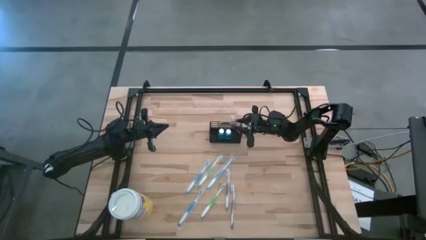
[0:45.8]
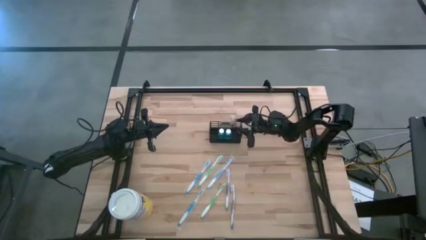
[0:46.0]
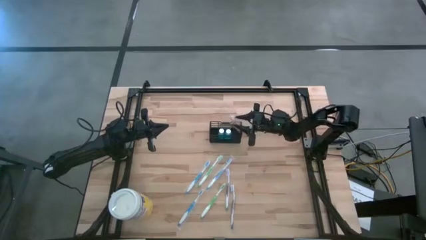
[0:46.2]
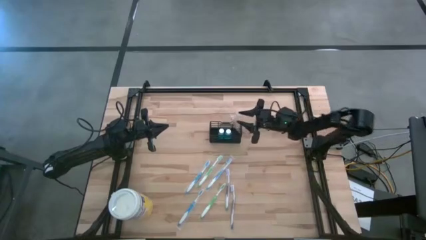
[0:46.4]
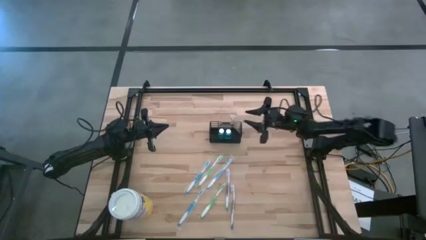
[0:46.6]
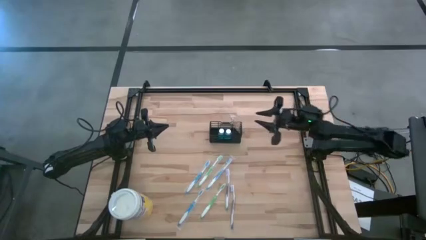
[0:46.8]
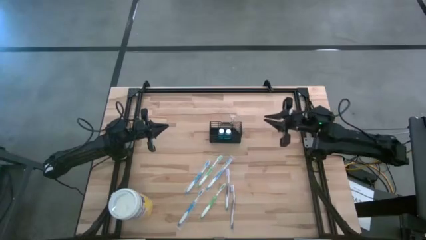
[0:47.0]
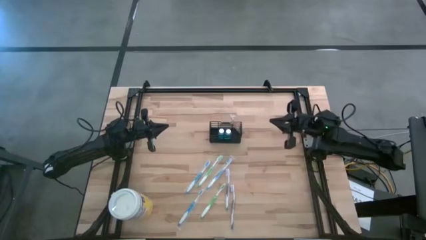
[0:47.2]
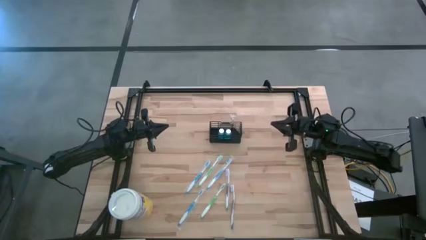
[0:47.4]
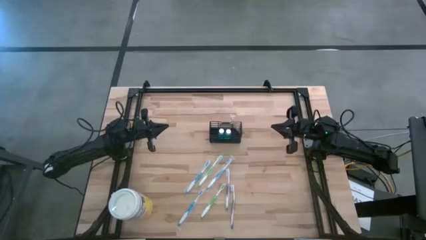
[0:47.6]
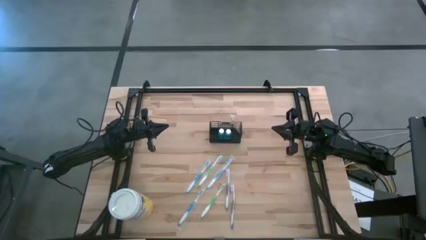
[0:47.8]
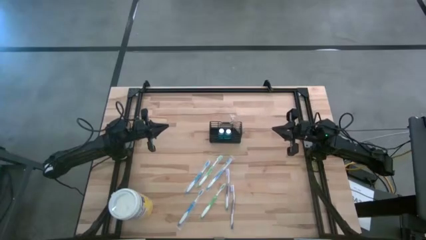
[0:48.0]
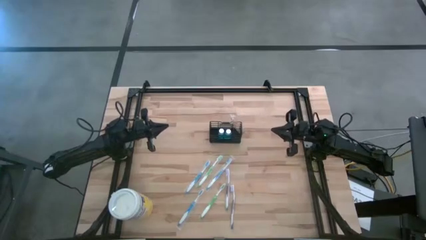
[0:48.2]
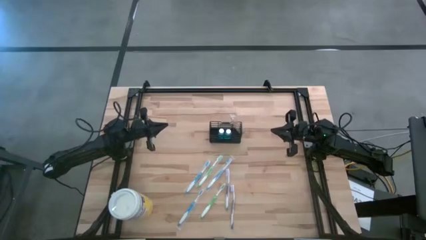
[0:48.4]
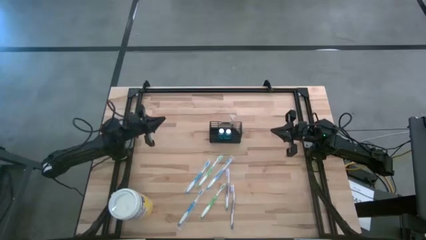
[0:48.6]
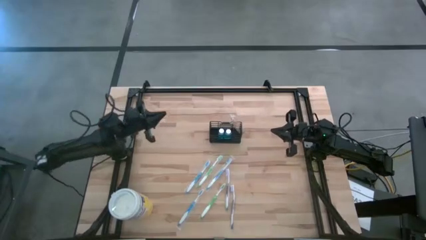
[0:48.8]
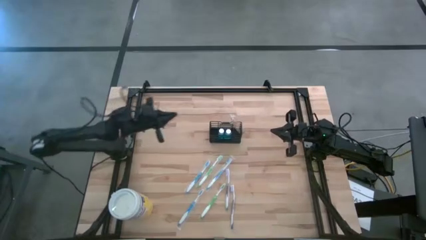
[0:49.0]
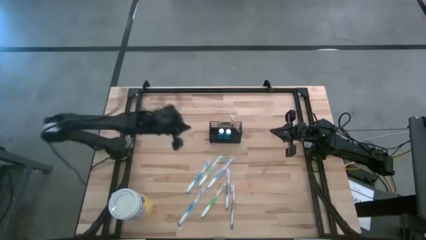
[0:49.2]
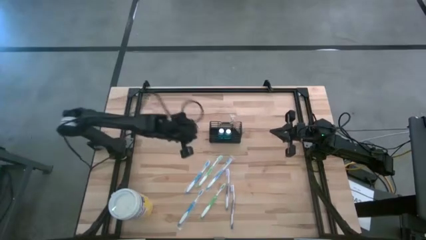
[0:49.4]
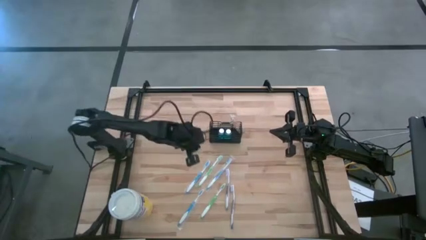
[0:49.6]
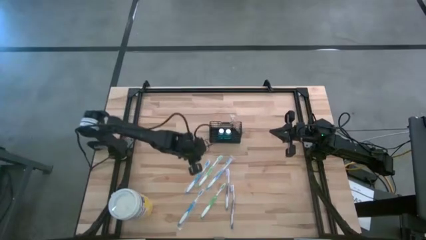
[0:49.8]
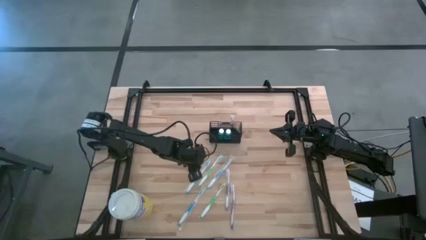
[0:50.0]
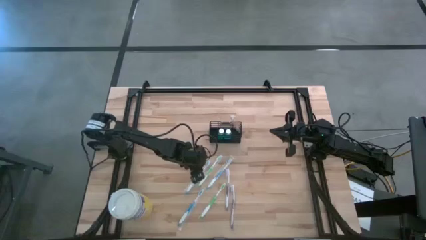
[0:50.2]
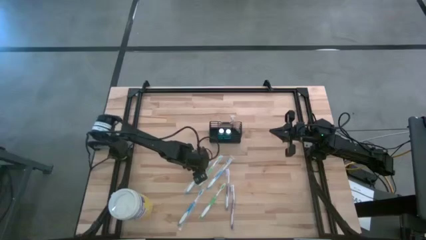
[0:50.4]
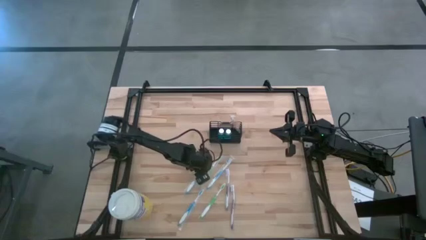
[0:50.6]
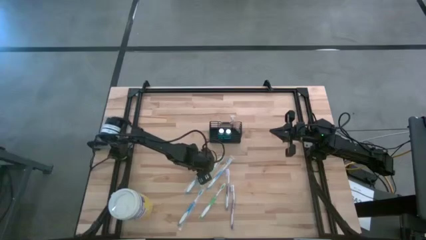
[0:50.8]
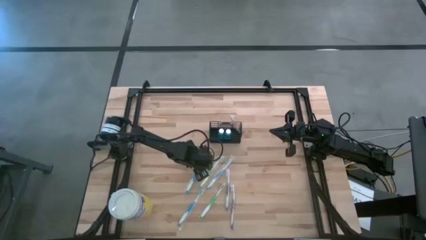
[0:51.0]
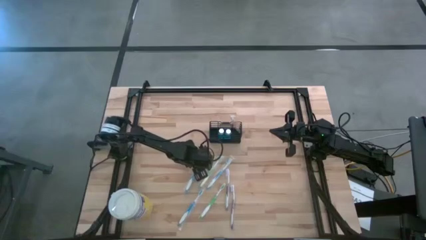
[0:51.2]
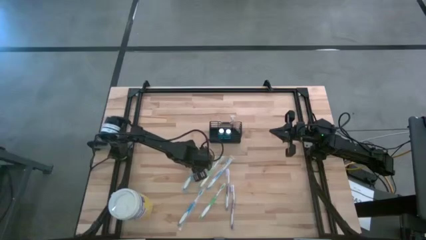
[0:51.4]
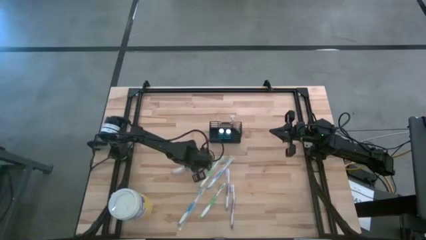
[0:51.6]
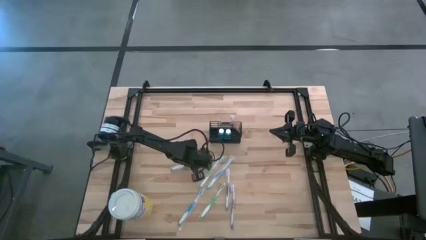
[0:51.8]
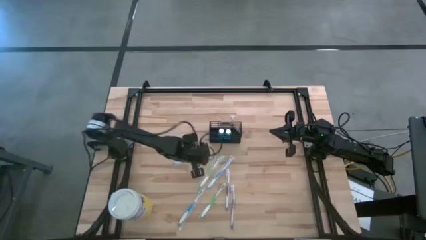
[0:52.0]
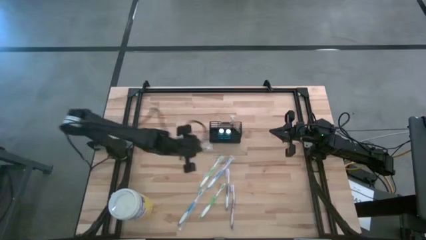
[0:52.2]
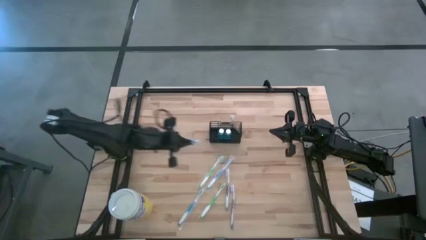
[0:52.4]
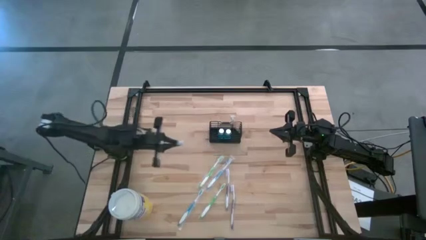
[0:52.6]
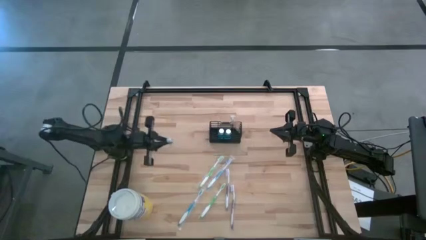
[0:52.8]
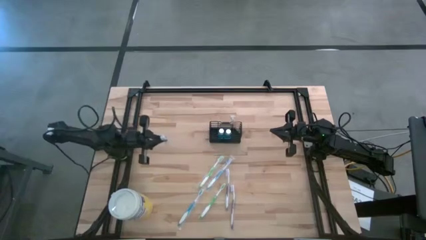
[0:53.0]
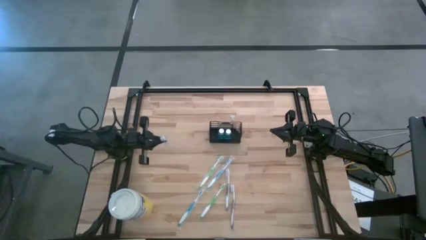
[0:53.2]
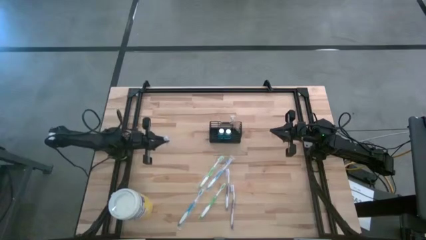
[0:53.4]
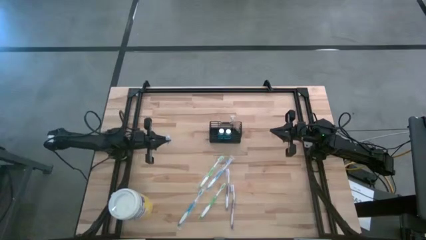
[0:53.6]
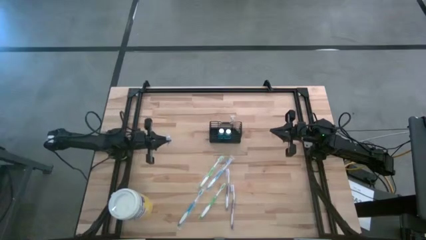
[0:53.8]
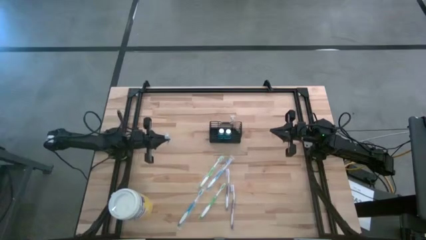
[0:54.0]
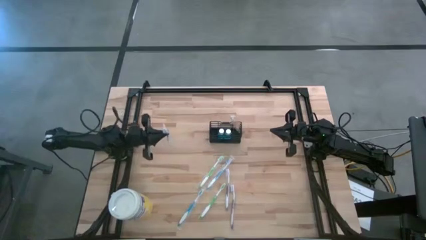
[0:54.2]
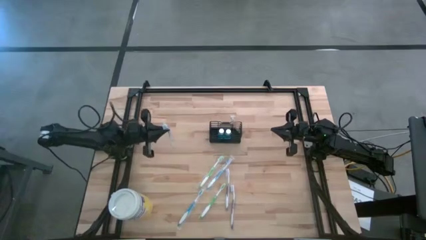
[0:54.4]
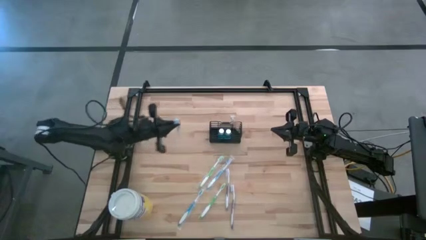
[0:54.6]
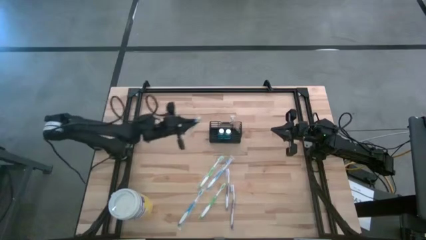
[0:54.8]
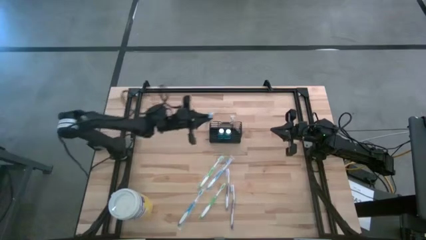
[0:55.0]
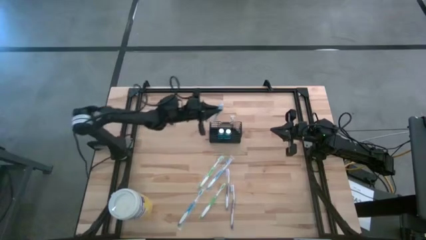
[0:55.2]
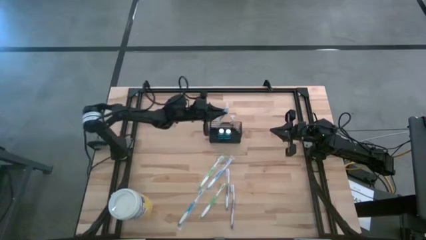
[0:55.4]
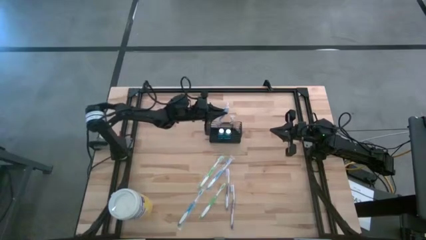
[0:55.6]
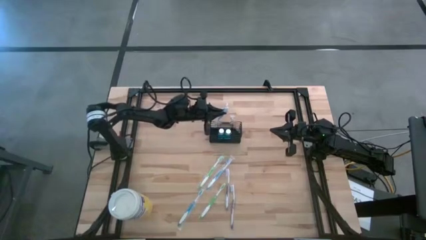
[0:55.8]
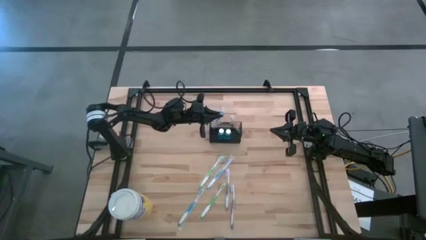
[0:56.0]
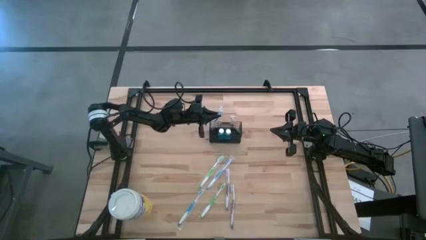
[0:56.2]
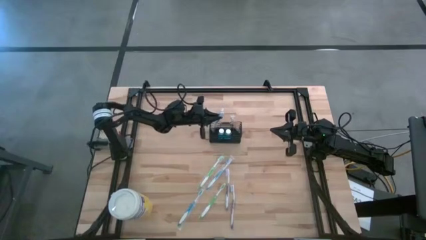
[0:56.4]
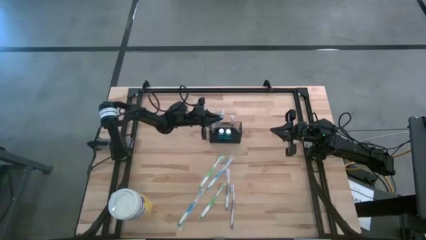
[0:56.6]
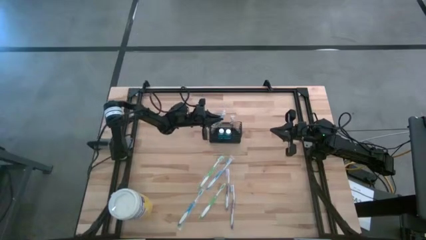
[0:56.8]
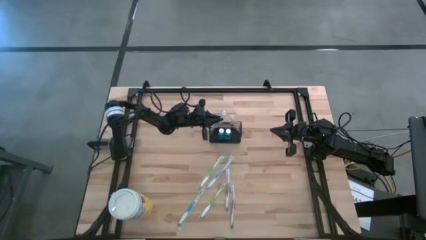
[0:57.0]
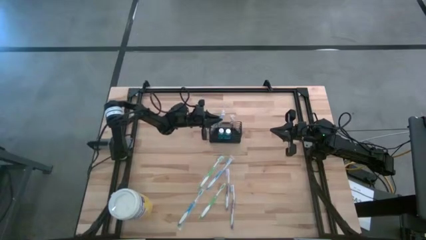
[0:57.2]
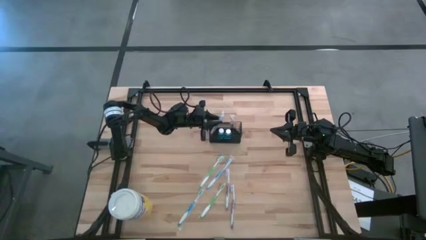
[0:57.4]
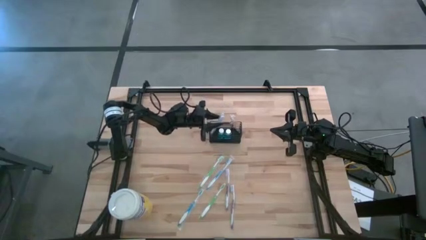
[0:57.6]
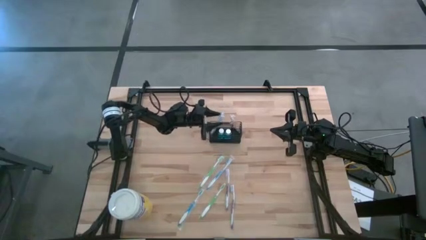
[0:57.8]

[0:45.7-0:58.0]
Task: Pick & Place toothbrushing station
Put the top left blue toothbrush into the wire organizer
